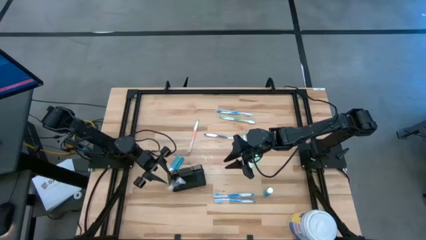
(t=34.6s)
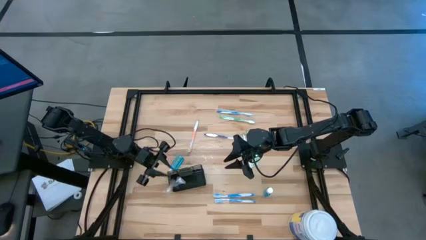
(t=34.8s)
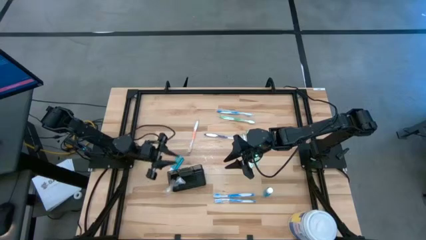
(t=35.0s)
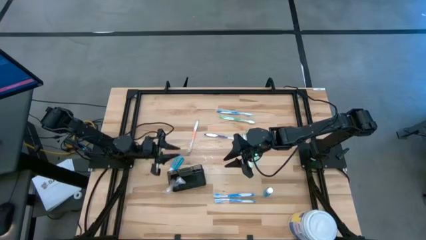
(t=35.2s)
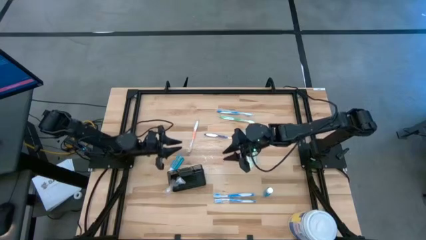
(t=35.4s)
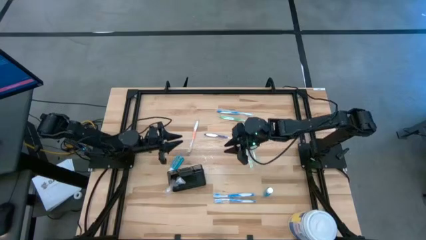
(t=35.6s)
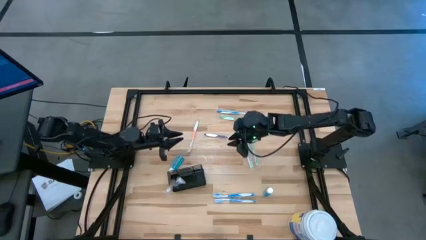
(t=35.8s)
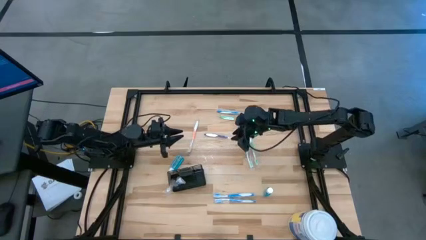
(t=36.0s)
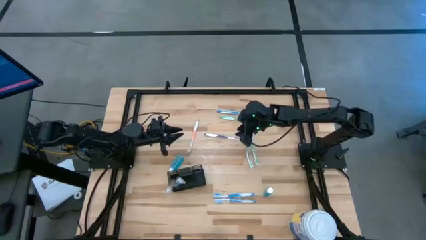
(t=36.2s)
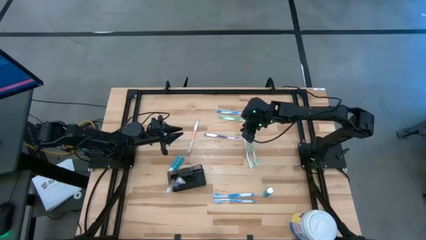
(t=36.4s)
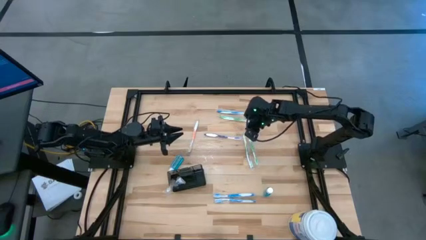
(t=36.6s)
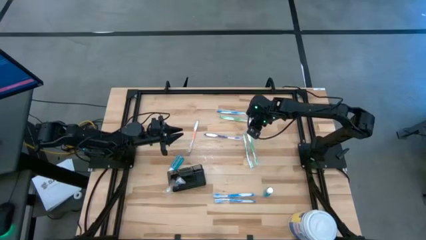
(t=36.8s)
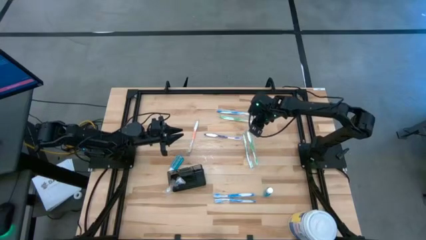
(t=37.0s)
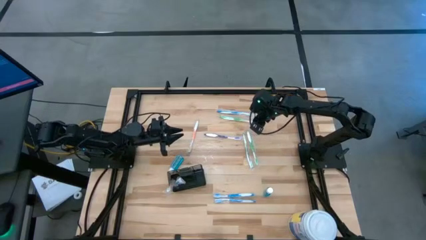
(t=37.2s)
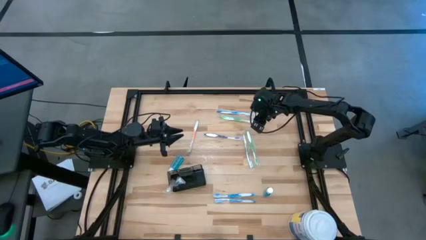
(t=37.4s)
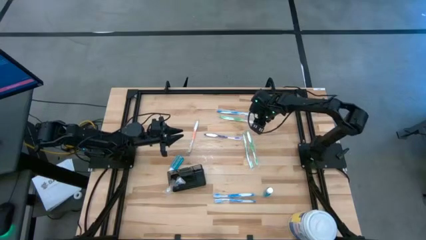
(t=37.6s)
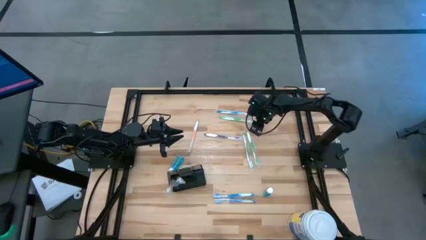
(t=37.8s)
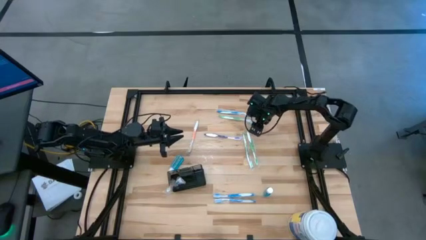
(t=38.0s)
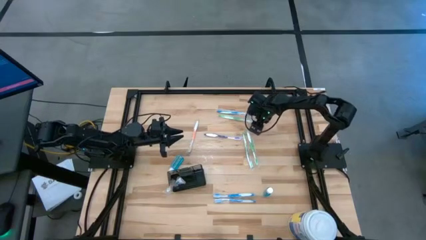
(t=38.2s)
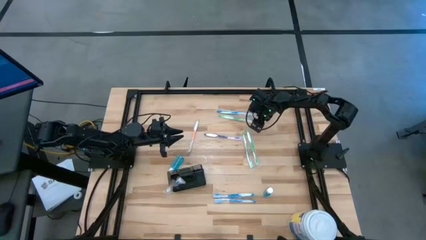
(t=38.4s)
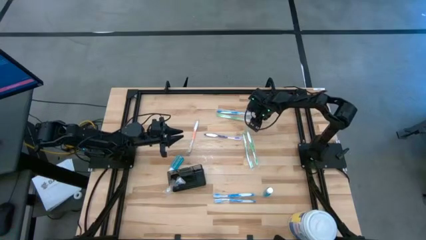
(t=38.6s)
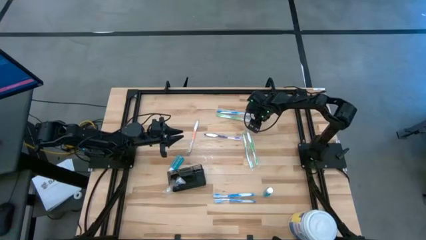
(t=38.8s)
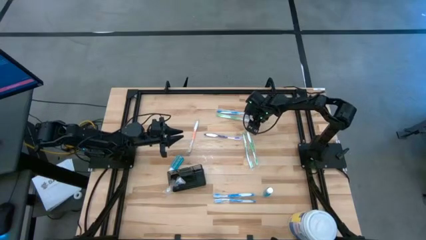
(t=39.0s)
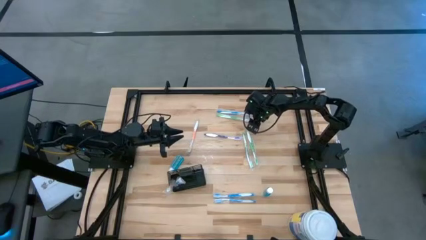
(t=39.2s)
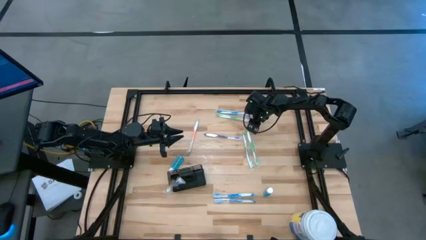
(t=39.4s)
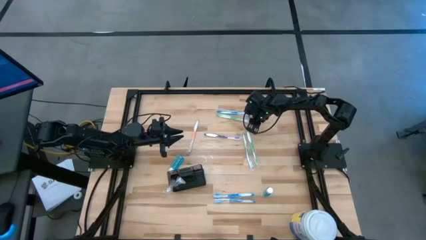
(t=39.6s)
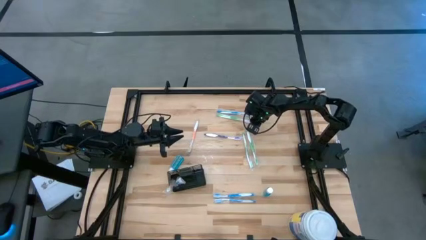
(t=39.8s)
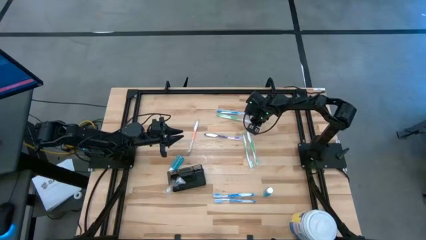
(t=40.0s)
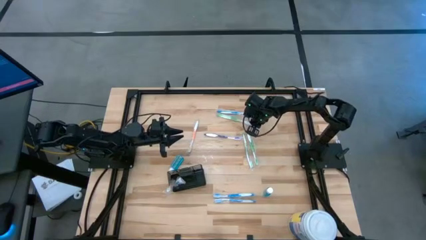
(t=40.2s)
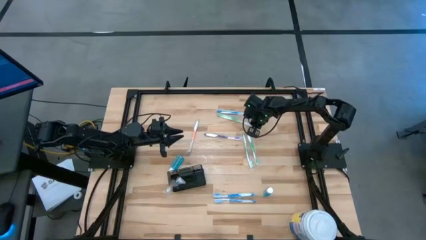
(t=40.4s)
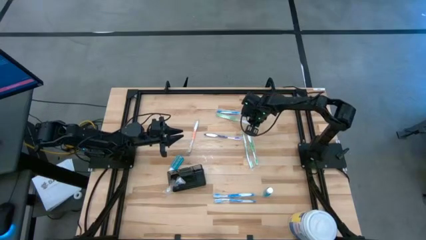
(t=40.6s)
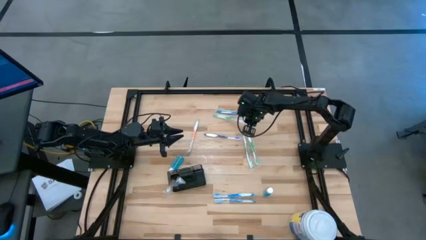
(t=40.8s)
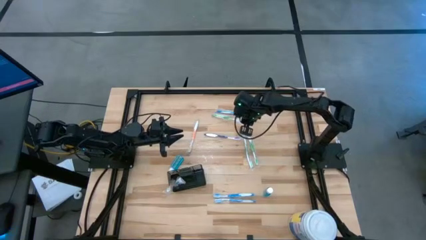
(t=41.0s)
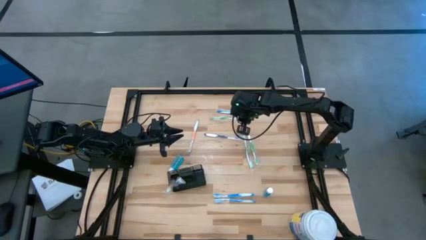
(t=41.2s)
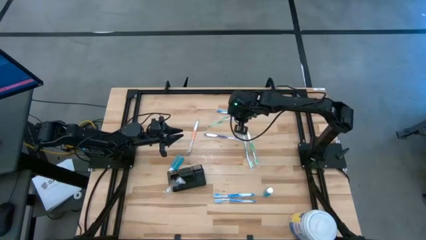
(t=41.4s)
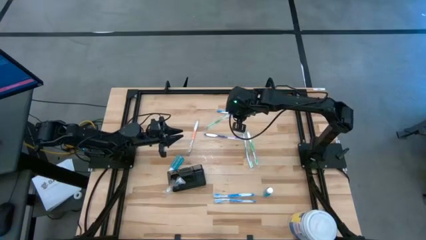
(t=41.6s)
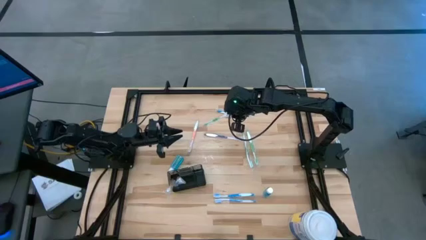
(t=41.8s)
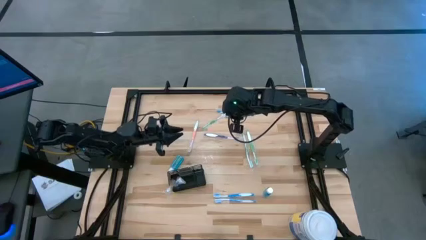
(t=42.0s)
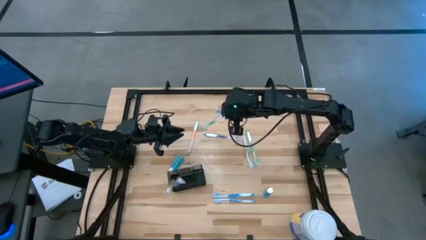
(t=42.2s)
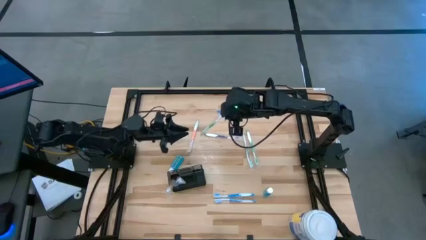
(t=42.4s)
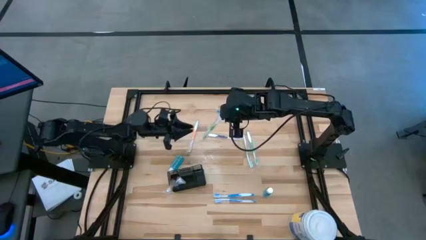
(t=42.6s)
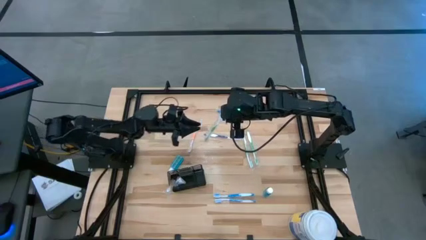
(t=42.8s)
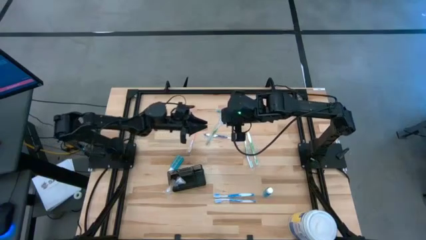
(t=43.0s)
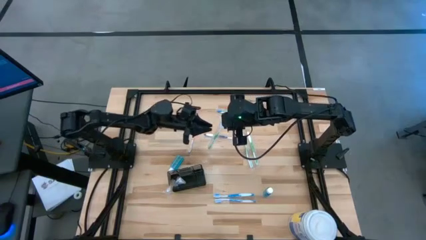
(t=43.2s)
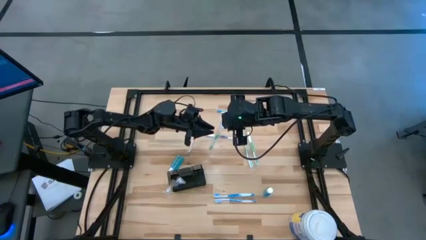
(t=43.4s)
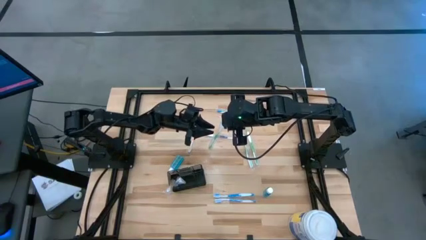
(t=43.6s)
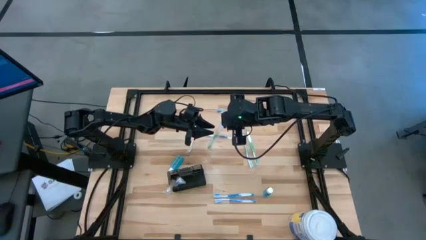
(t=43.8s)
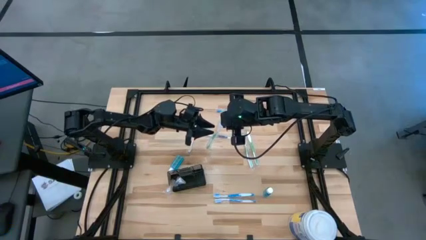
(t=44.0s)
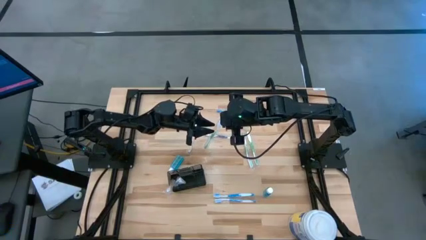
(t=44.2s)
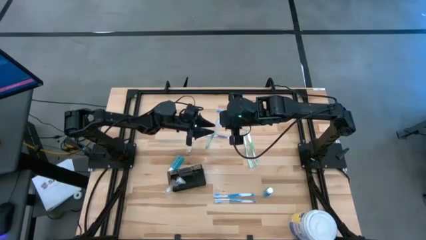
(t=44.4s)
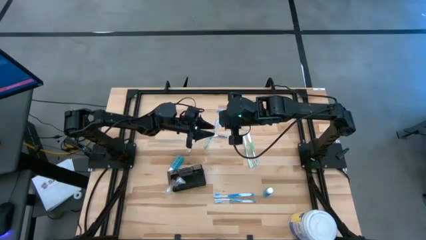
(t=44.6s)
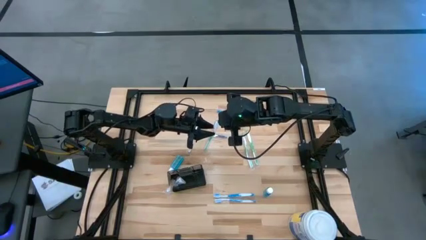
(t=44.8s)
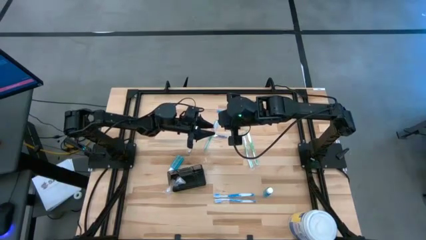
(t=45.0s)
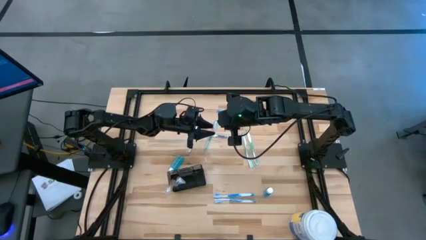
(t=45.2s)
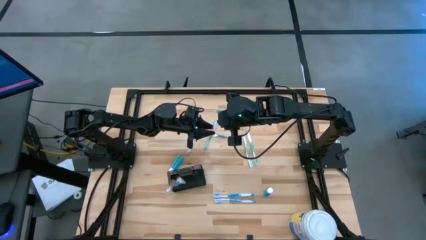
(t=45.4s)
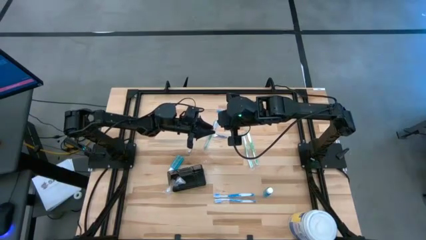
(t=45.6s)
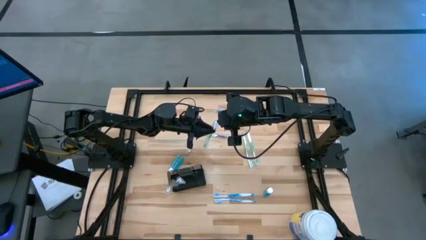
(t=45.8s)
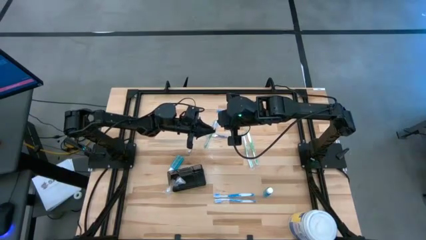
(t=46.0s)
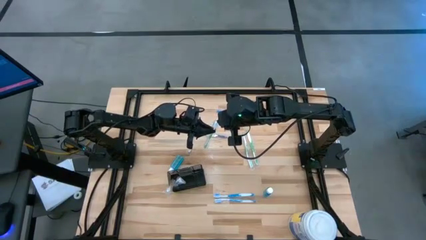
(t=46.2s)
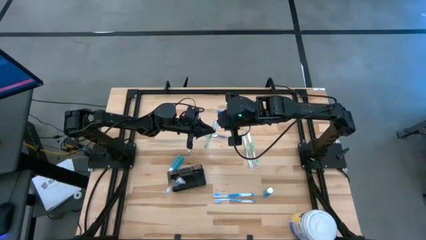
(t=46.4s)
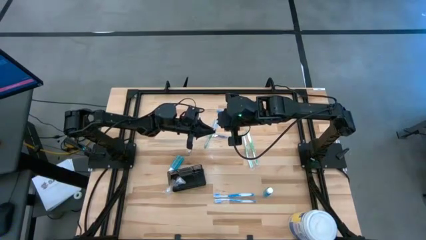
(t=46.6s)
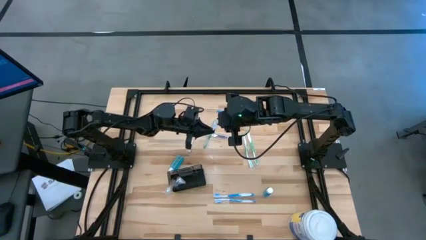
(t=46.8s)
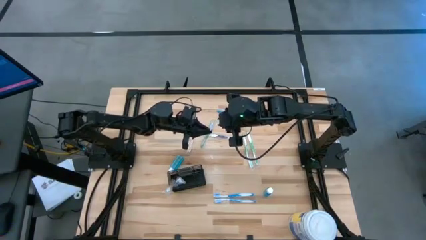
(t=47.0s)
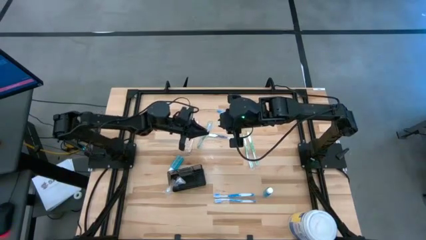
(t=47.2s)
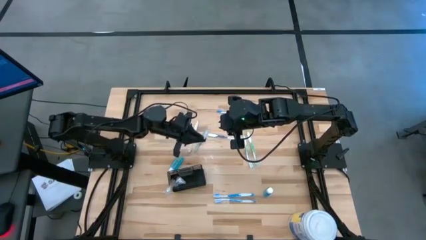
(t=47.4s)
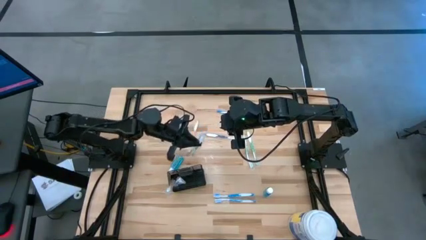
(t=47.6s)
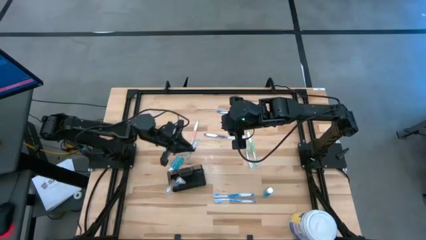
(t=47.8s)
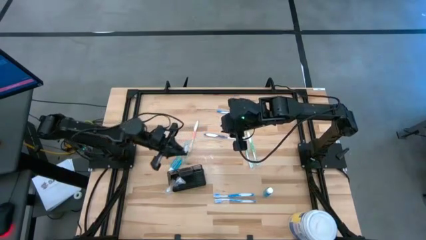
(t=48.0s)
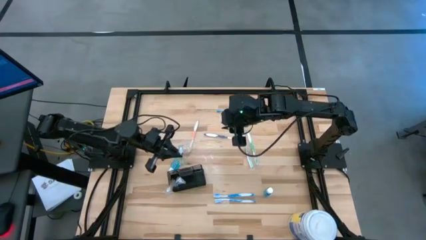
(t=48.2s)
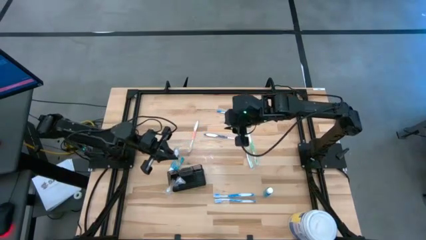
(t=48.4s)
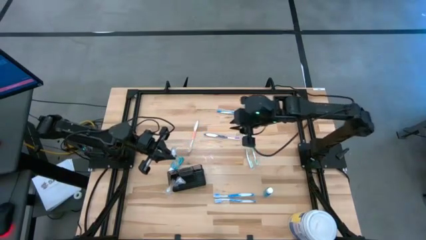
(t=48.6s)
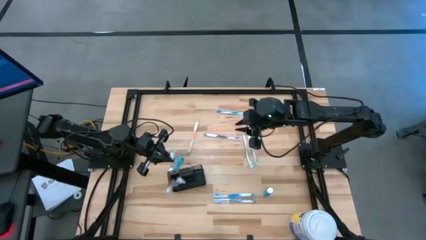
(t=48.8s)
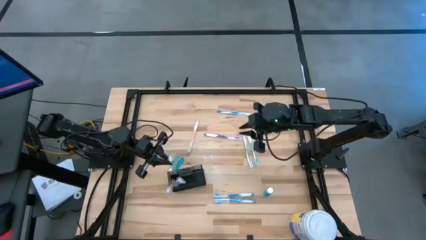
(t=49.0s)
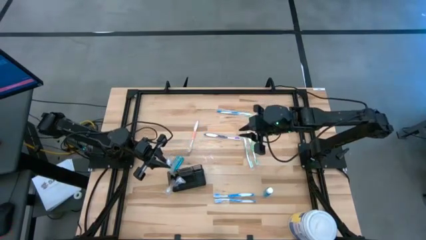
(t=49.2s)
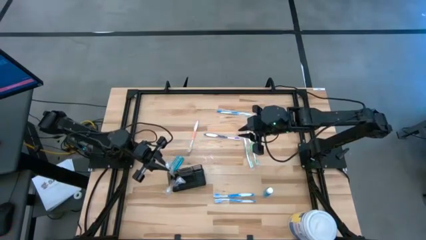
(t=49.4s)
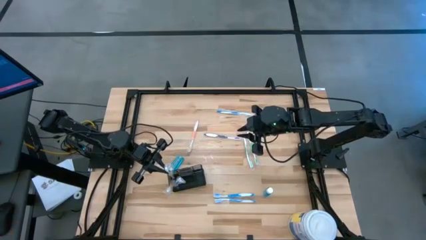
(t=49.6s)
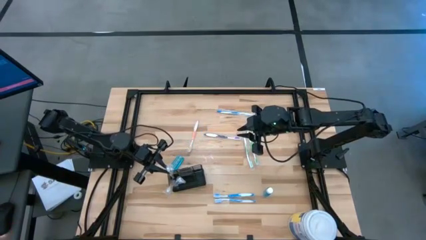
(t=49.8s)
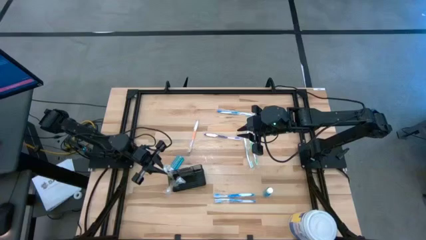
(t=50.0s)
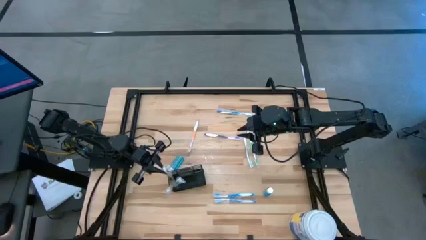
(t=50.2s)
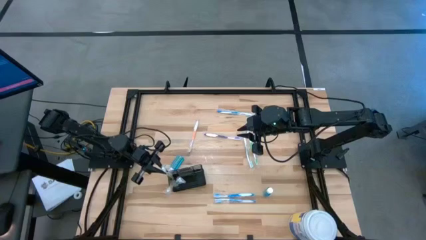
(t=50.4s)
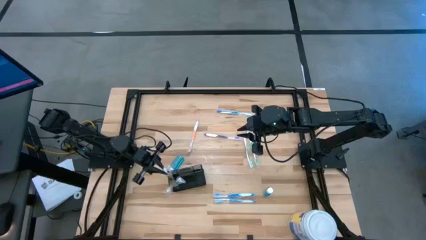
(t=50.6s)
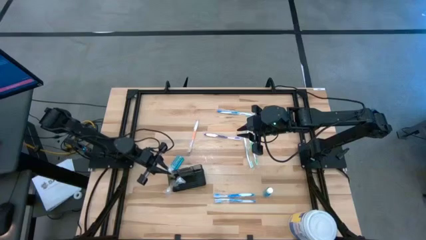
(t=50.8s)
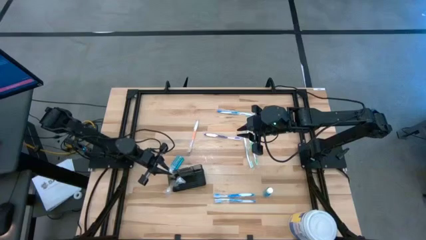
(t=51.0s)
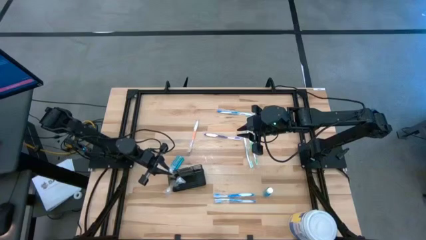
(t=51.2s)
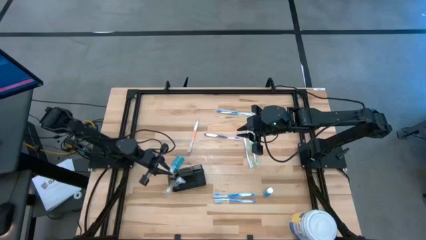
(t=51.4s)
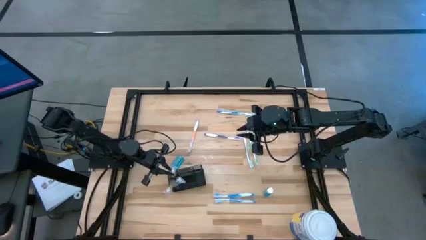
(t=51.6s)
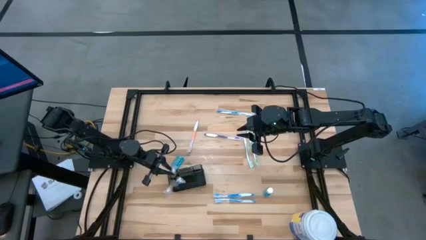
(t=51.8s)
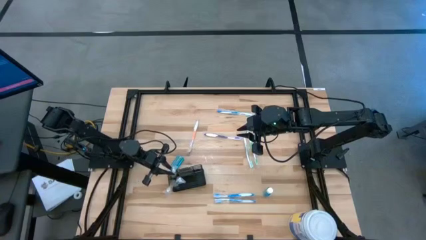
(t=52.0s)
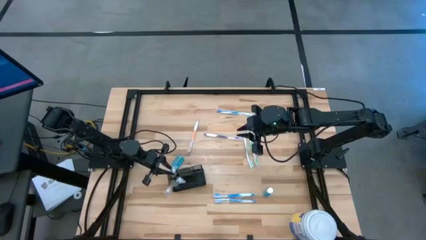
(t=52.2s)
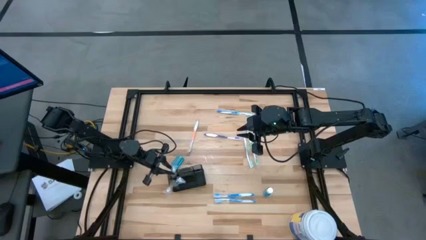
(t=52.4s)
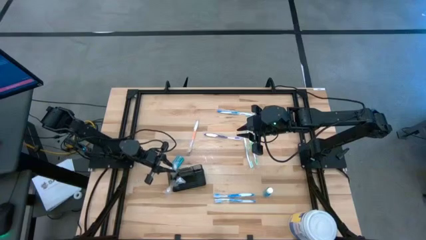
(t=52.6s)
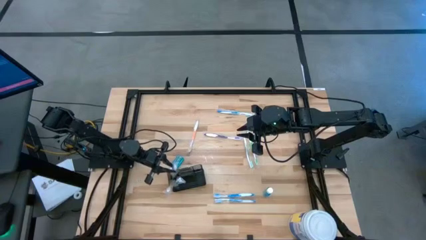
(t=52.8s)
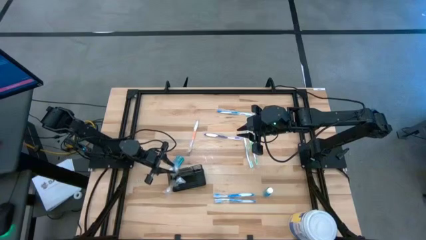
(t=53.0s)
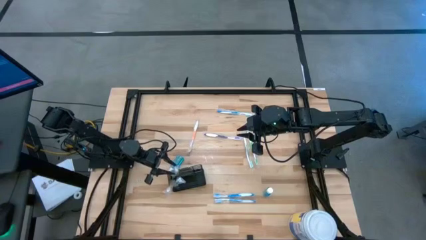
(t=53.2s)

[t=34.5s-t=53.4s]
Task: Pick & Place toothbrushing station
Put the white green toothbrush into the black toothbrush rack
